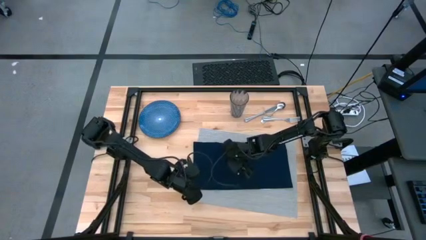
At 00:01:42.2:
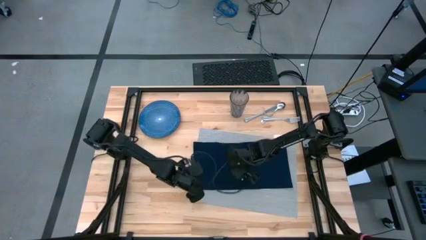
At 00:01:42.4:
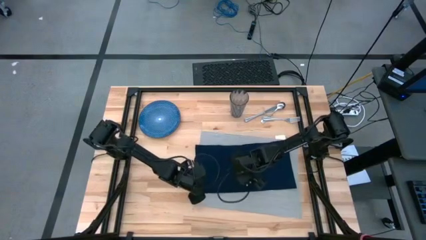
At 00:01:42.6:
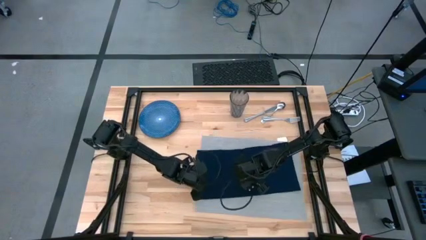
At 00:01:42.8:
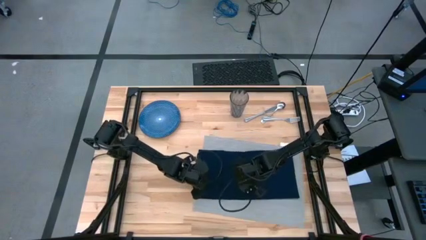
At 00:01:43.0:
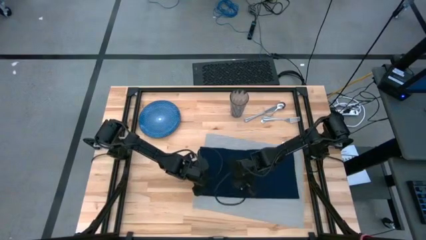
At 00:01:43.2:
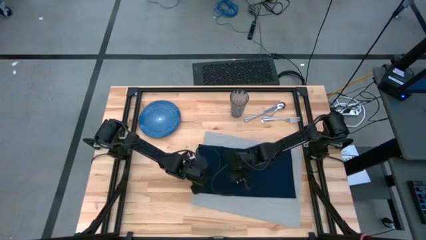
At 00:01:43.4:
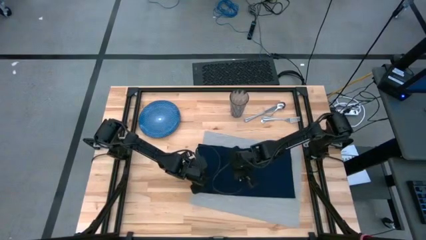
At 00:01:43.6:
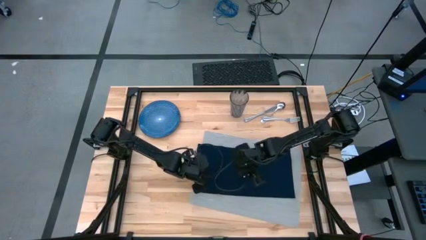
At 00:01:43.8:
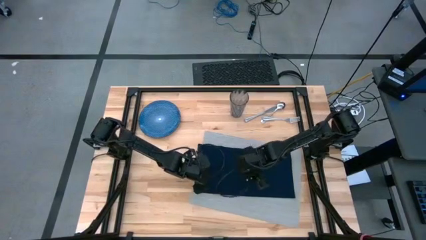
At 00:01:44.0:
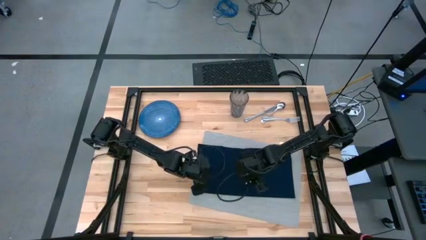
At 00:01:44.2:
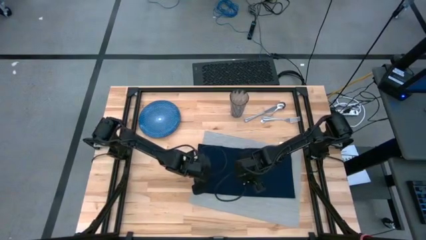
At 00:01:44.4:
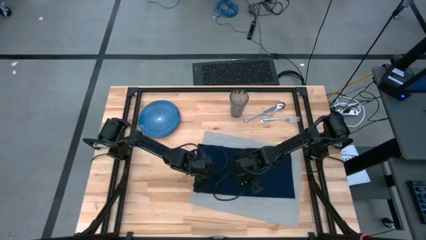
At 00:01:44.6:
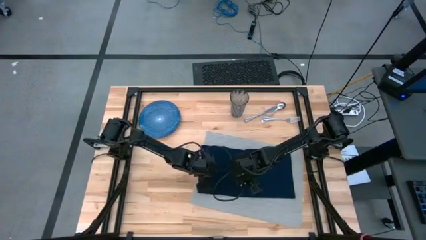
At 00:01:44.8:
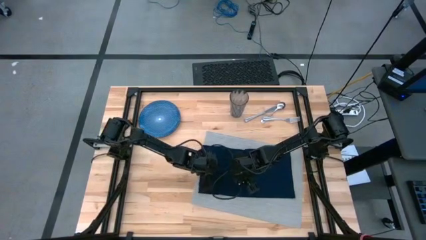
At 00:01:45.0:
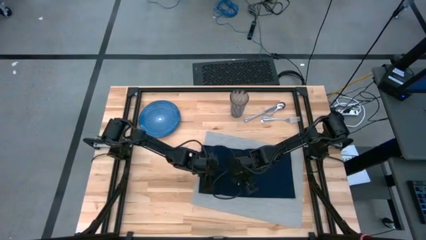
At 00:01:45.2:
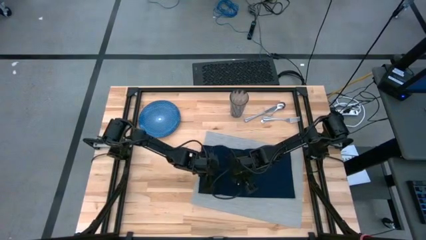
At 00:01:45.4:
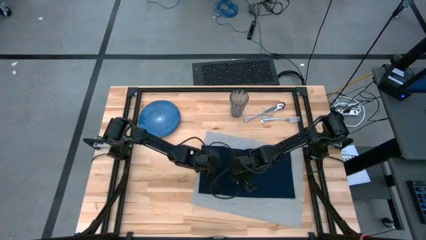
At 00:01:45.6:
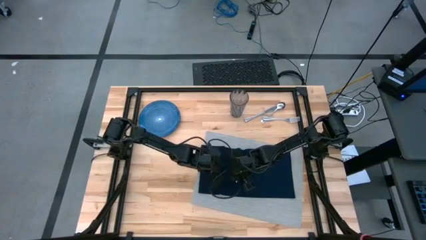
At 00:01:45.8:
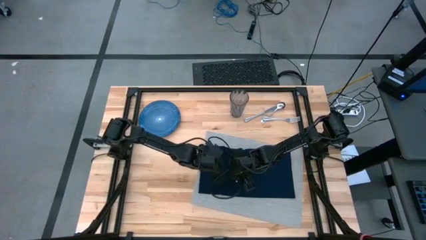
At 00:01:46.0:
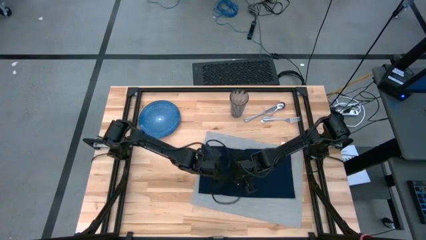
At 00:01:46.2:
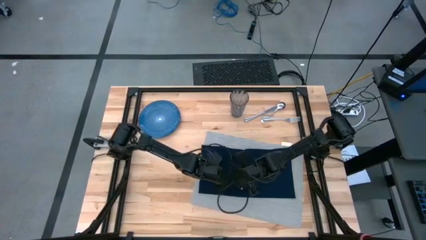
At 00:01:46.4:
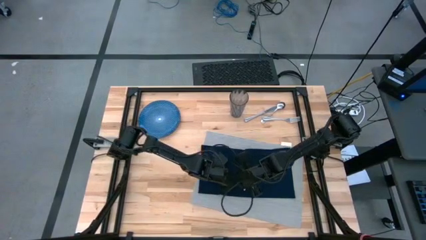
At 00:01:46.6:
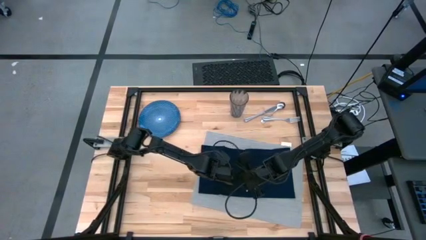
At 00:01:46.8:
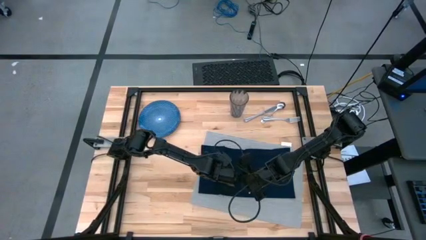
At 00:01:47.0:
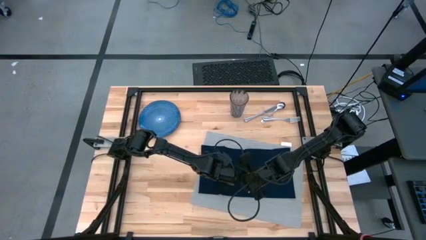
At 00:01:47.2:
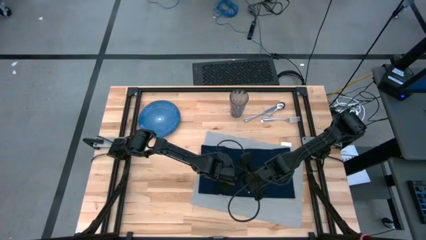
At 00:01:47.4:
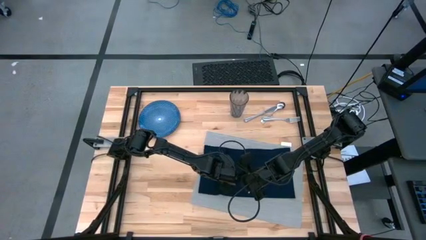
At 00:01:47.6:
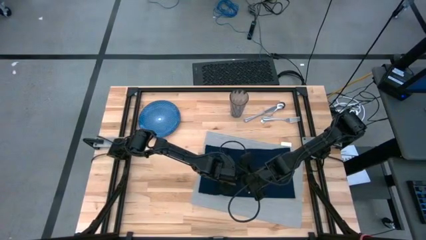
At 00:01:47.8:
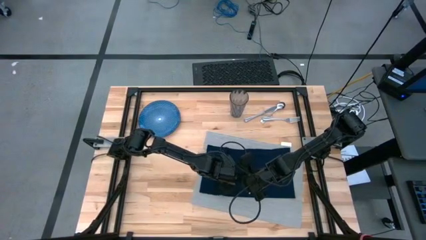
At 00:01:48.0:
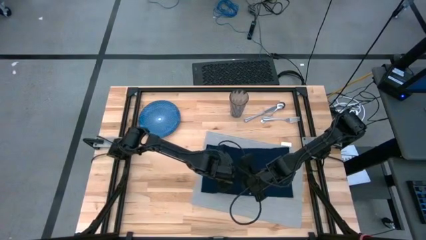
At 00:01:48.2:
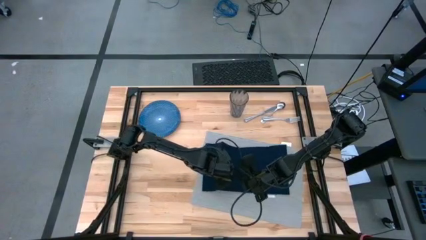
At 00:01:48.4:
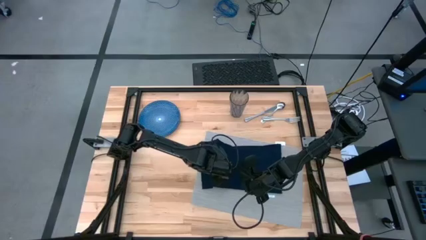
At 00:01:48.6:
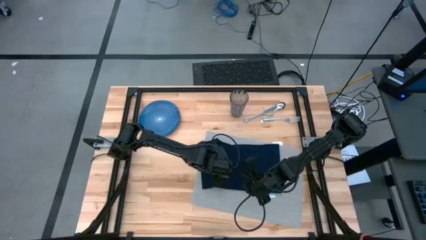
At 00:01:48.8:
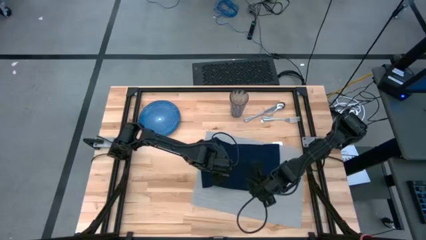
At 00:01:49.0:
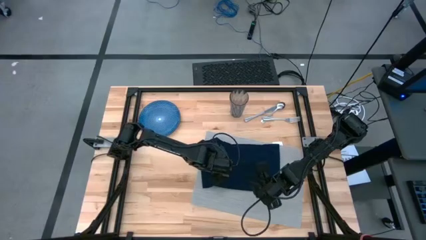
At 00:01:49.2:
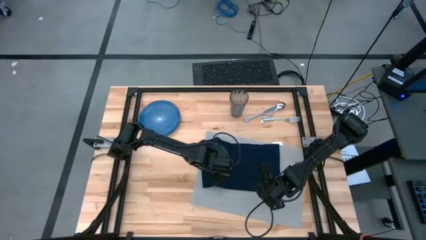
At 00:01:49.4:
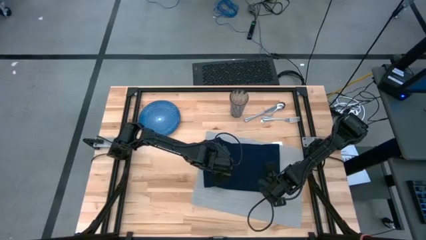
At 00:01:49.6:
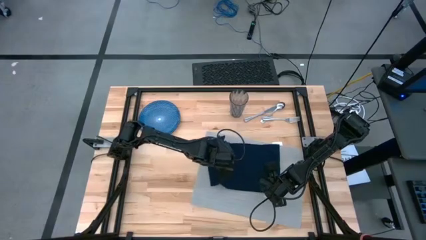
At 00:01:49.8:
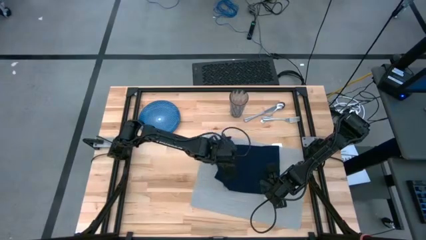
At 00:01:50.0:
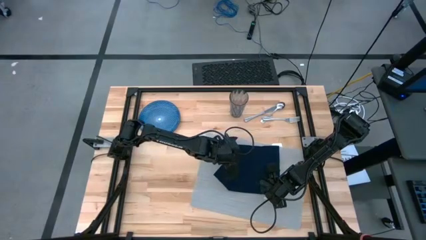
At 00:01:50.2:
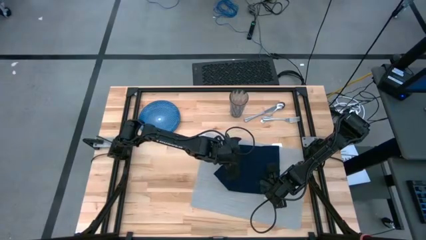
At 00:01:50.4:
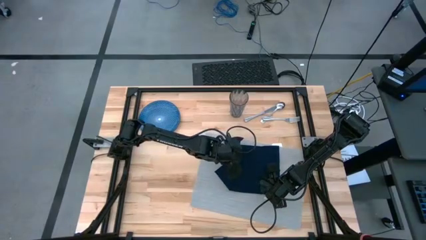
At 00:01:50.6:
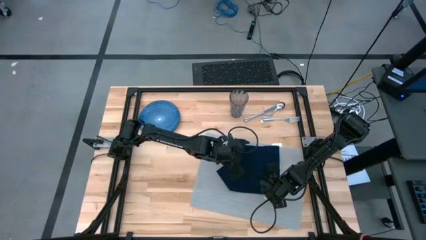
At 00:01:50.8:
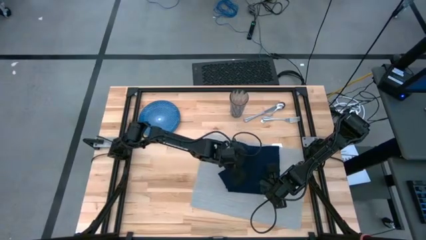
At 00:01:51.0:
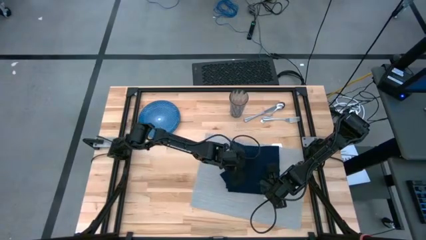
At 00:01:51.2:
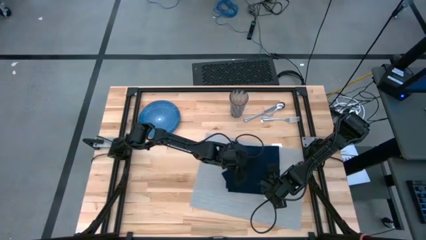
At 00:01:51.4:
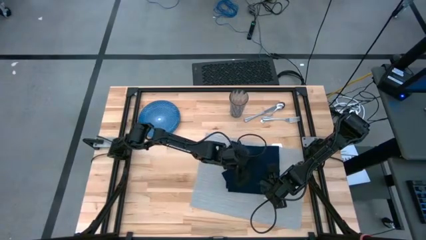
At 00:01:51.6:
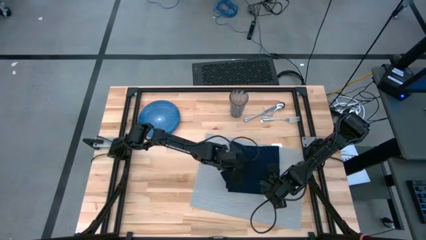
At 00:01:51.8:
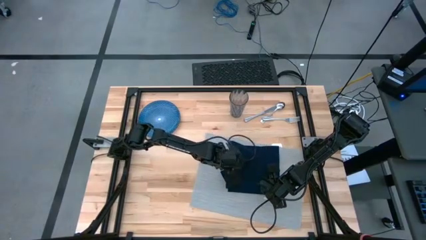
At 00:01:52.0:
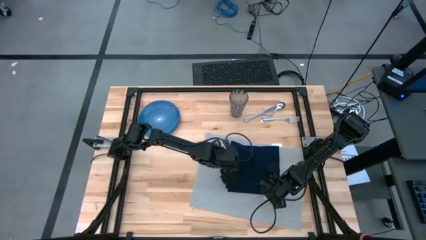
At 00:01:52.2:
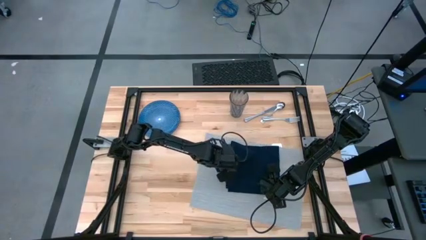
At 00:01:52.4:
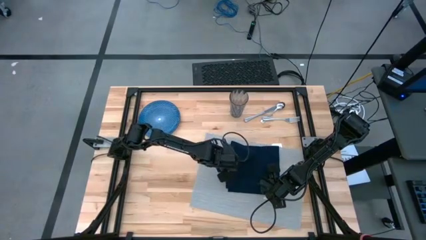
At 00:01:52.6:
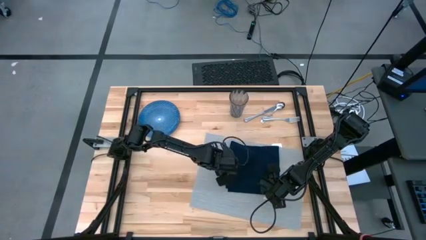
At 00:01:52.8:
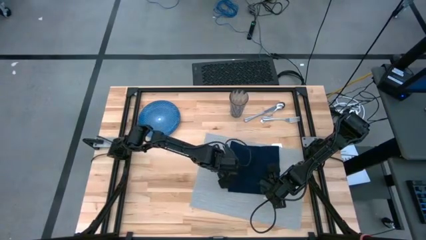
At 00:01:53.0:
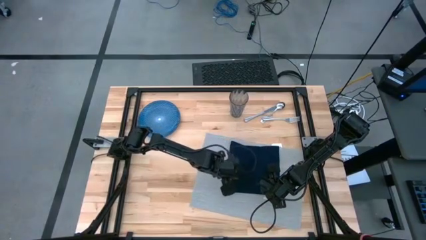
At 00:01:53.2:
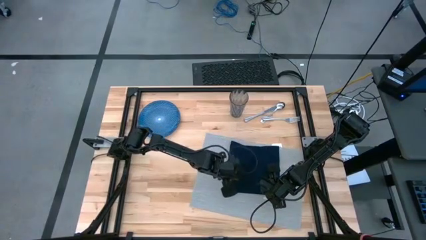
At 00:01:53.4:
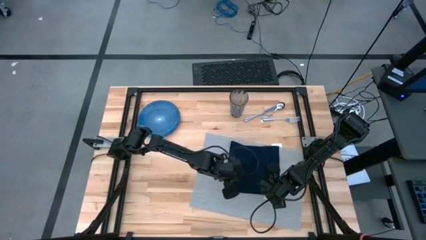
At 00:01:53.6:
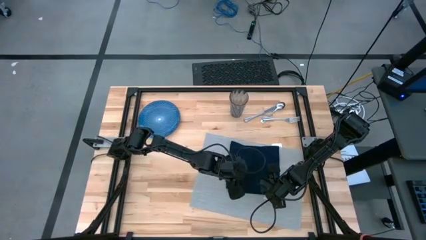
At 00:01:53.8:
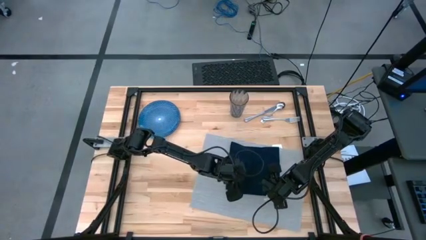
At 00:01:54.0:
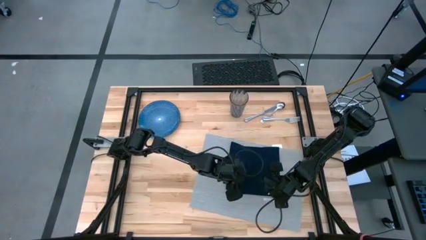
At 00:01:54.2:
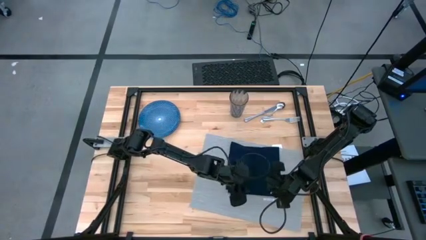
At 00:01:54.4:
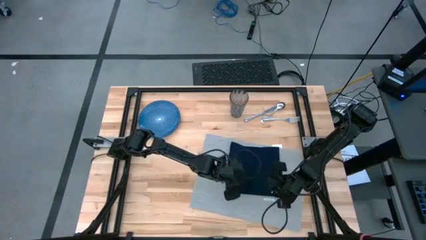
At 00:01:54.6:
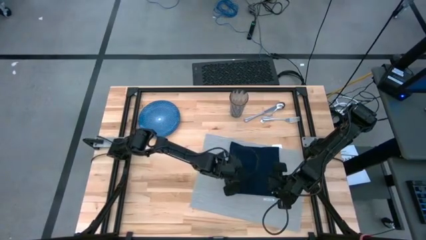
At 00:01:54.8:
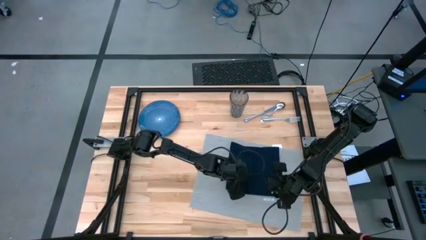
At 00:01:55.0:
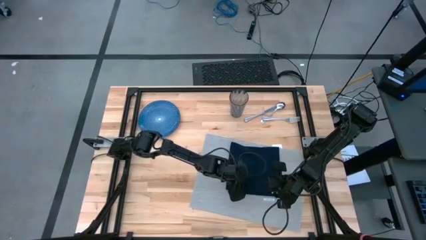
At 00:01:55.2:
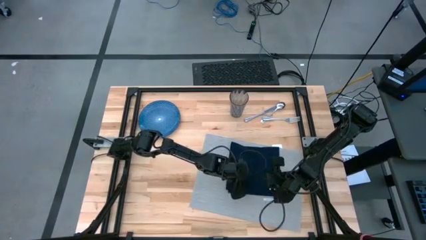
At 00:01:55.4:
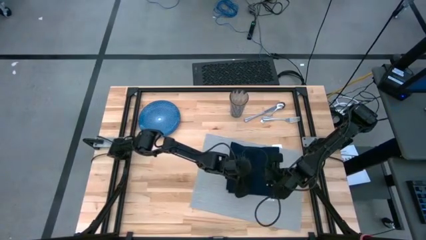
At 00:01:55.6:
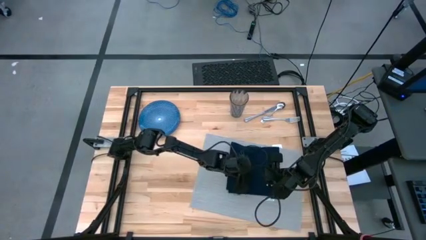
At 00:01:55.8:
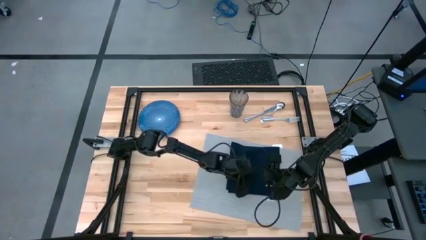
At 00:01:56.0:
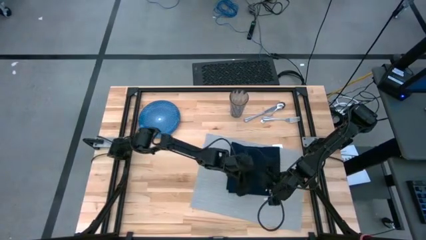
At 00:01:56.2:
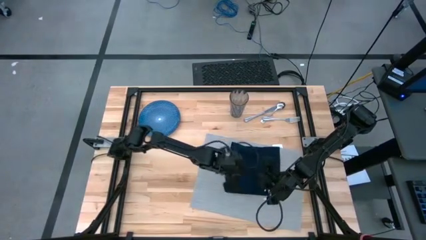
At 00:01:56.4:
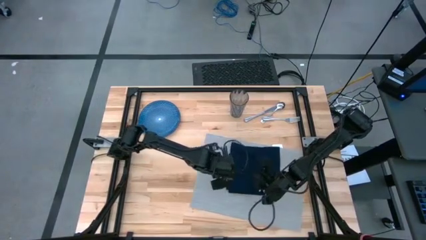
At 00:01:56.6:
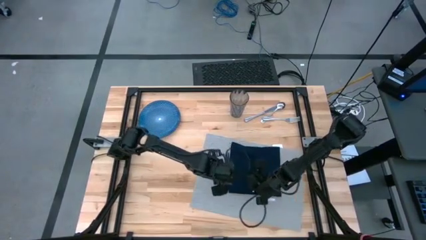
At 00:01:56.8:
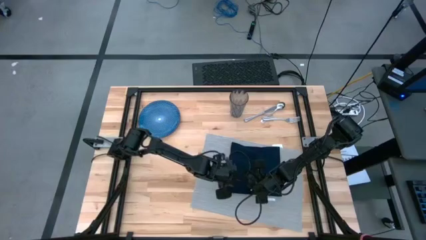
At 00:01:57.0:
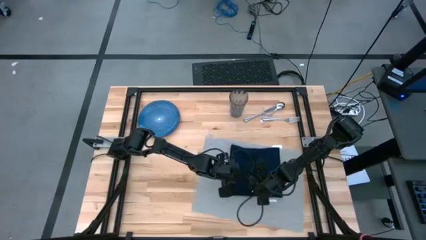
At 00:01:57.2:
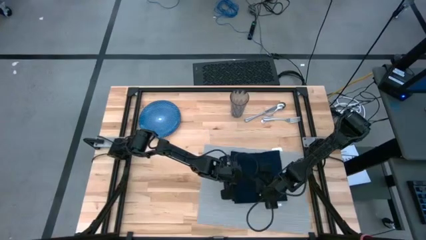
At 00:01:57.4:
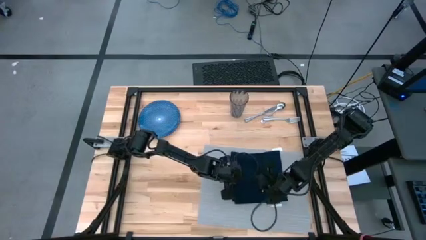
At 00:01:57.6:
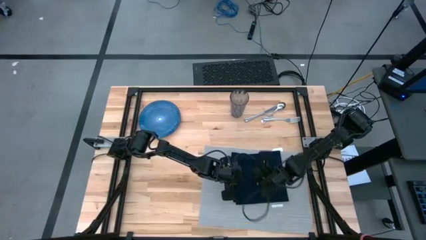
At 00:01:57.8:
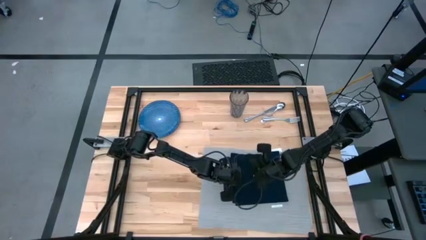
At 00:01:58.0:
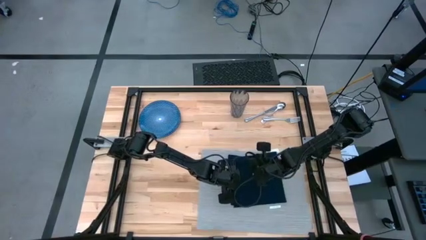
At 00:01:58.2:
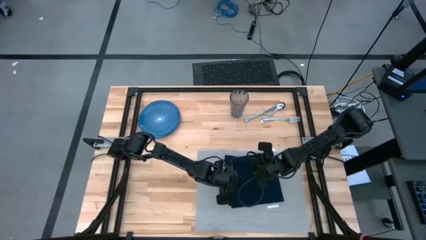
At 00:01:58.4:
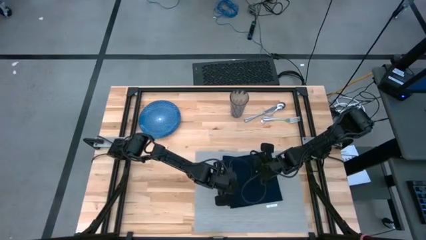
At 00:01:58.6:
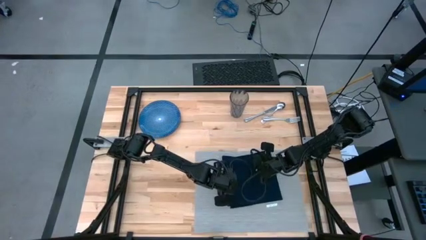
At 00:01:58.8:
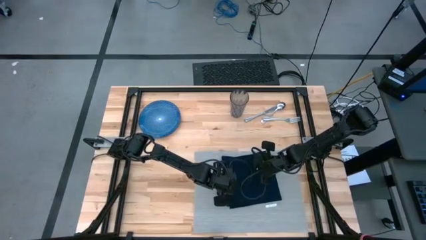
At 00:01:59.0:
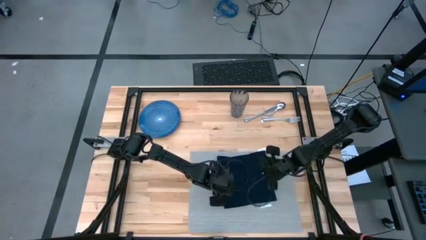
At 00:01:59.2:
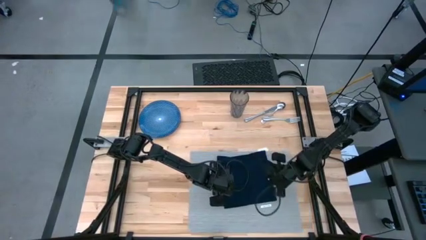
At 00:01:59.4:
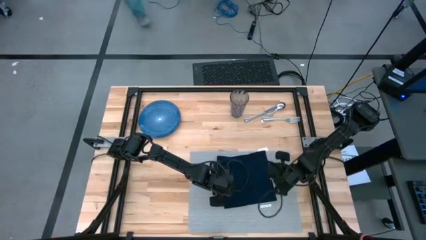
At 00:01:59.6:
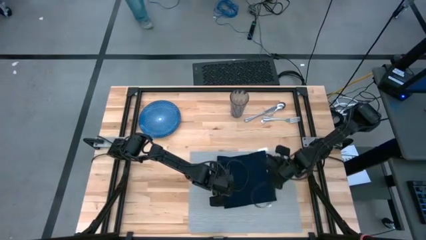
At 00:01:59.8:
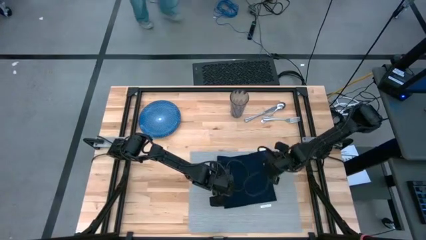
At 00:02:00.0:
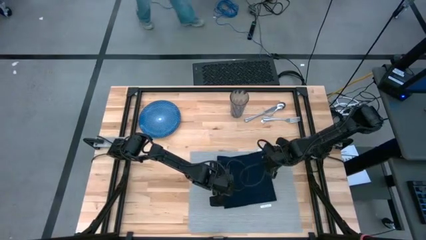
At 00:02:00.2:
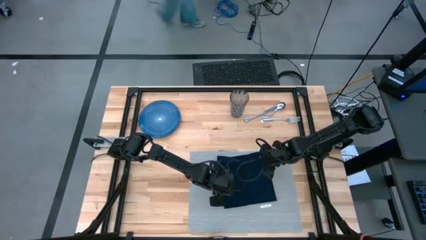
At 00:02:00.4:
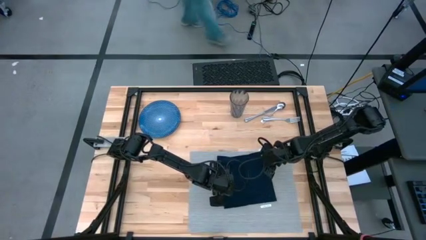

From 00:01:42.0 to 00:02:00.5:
Task: Set table place
Fold the blue napkin
